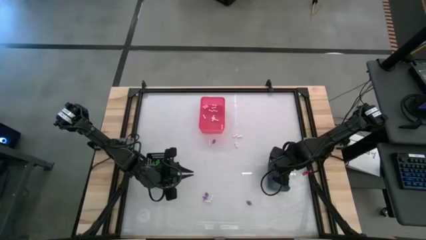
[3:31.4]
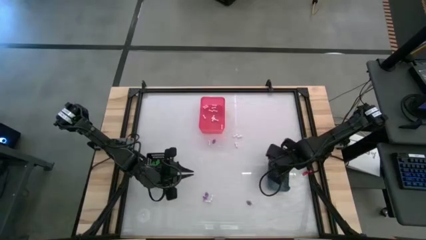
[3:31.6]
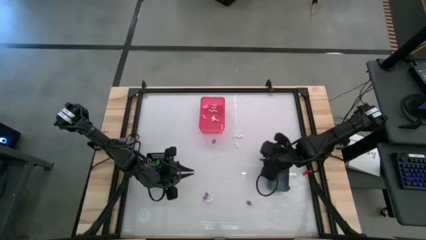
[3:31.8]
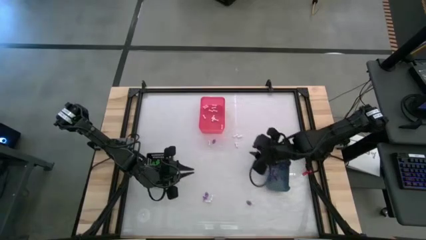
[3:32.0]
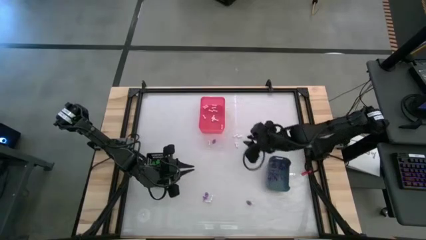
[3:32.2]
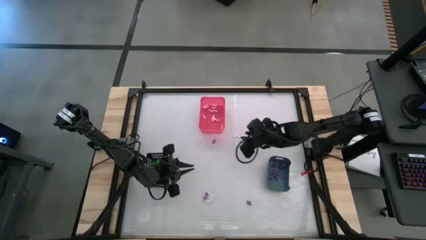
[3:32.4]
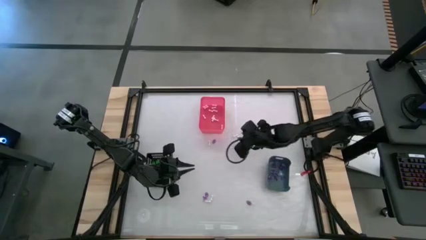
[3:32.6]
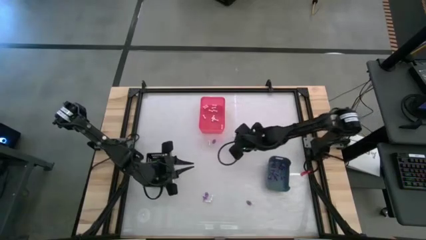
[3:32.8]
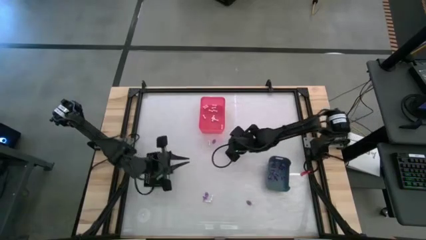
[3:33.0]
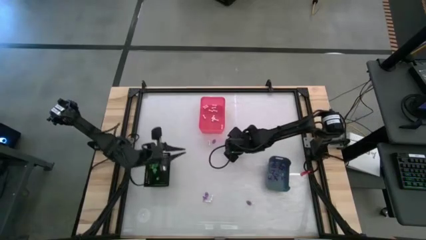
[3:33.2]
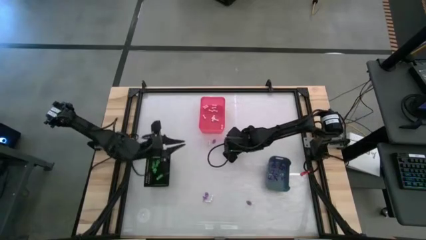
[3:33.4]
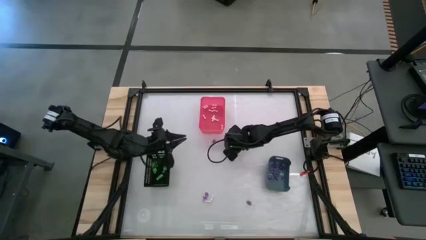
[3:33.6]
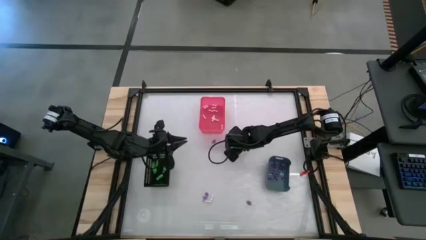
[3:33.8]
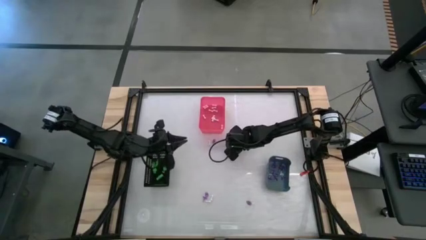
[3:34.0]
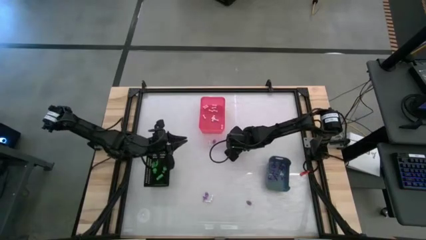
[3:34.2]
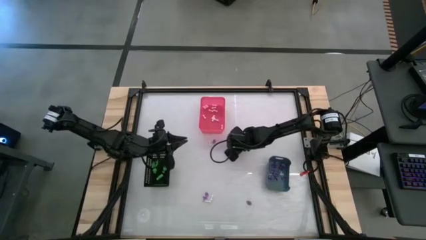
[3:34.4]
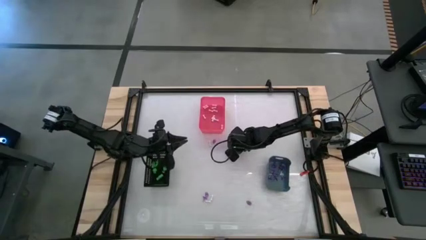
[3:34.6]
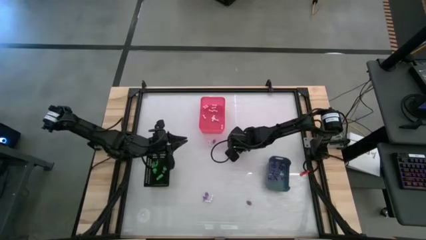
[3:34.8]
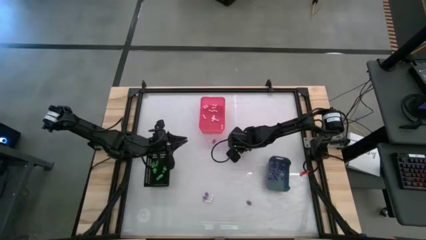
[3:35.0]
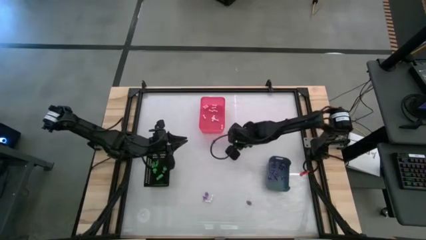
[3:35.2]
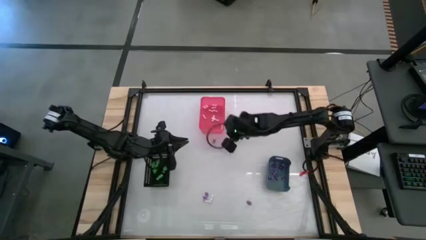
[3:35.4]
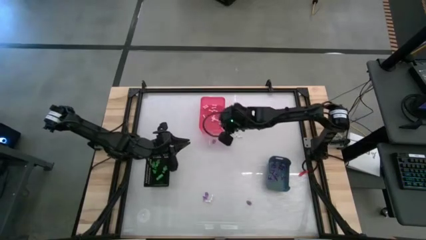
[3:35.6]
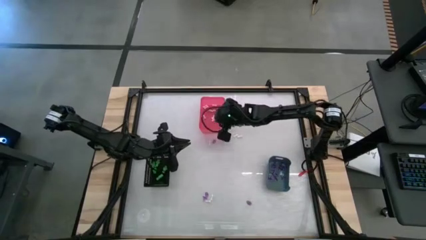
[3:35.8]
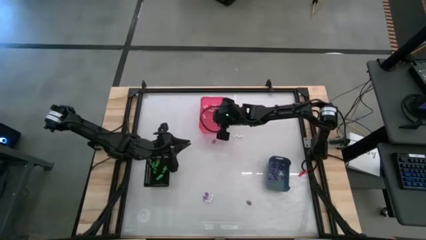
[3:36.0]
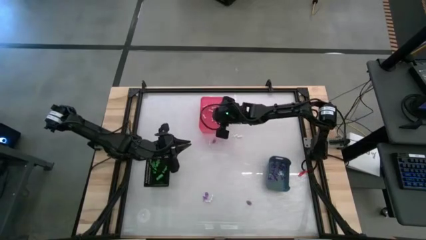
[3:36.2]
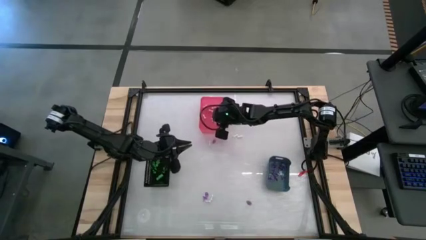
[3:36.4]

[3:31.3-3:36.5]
Task: Sort Halloween decoration
Put the bone toy into the red bin

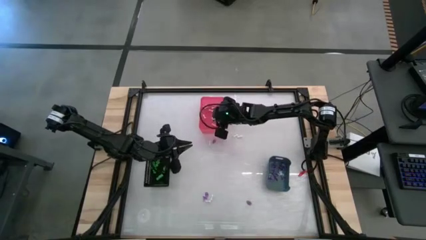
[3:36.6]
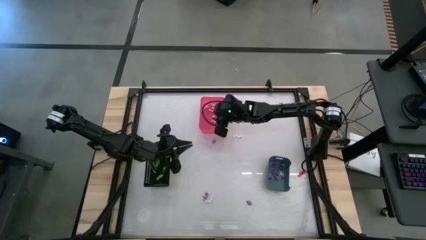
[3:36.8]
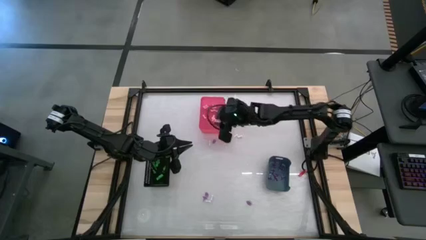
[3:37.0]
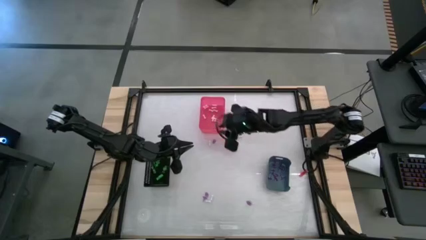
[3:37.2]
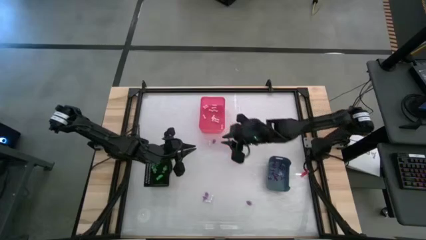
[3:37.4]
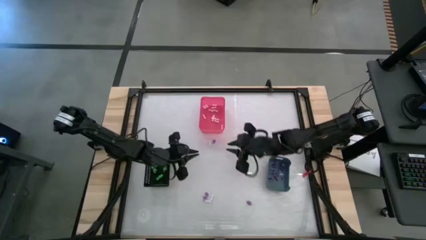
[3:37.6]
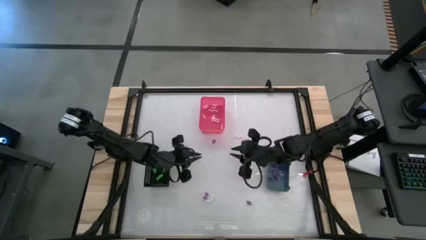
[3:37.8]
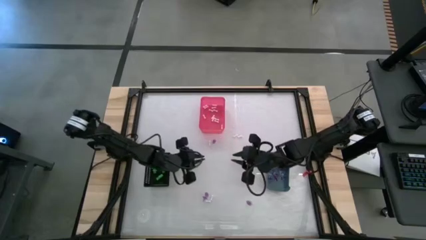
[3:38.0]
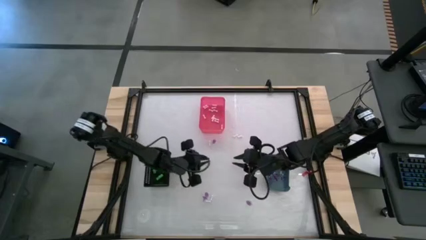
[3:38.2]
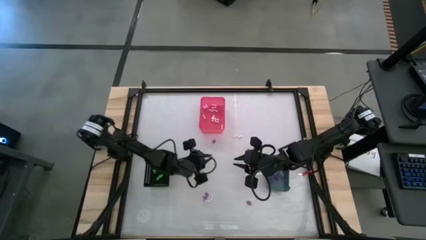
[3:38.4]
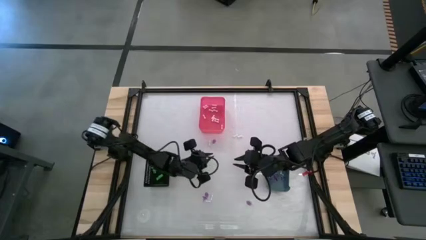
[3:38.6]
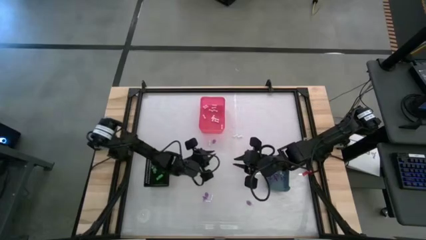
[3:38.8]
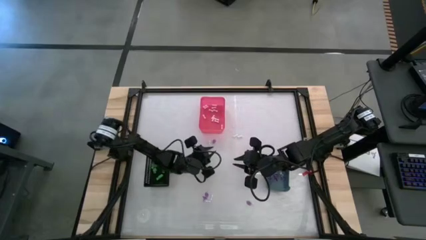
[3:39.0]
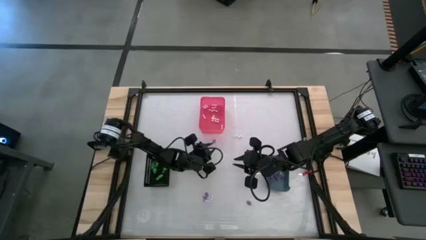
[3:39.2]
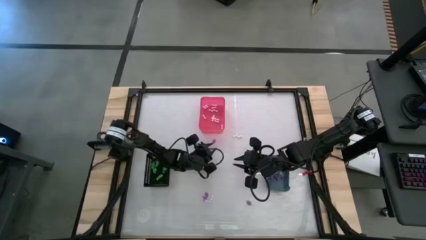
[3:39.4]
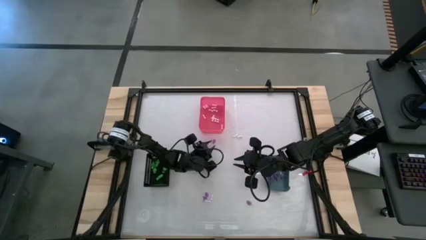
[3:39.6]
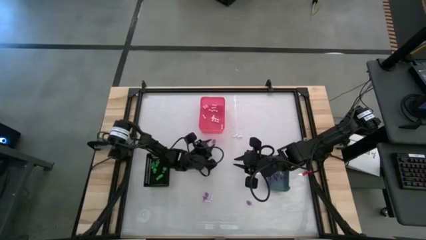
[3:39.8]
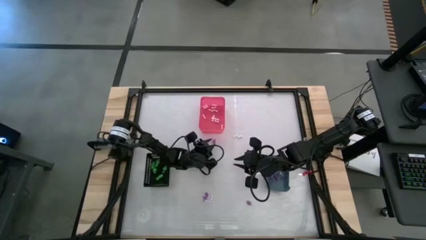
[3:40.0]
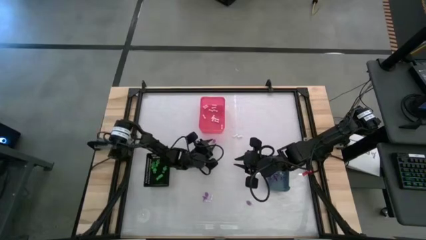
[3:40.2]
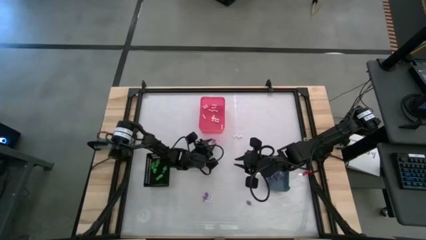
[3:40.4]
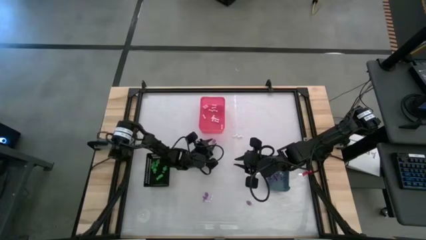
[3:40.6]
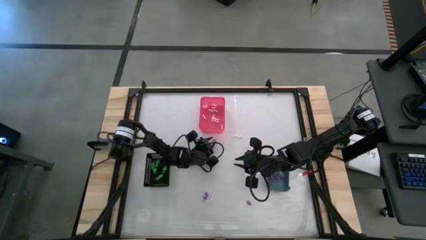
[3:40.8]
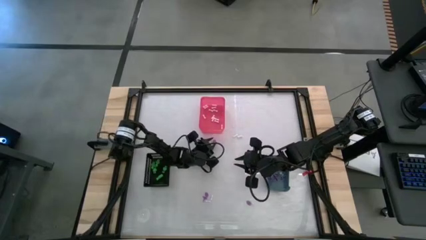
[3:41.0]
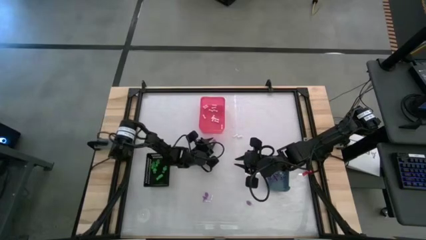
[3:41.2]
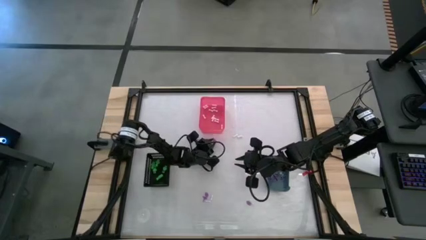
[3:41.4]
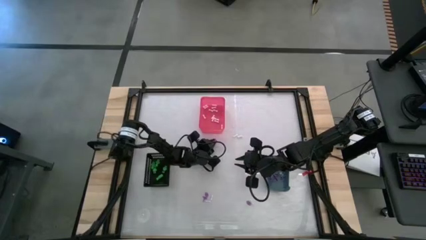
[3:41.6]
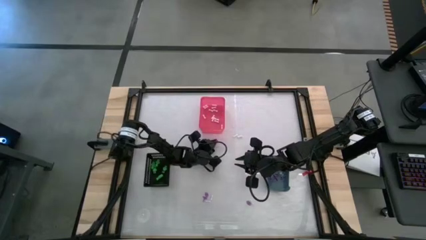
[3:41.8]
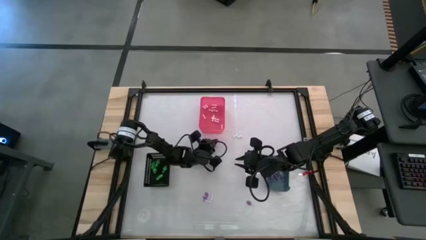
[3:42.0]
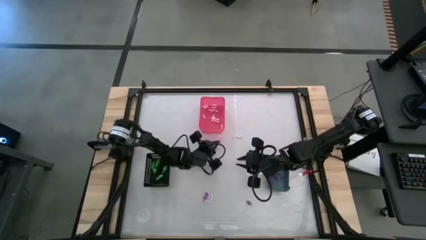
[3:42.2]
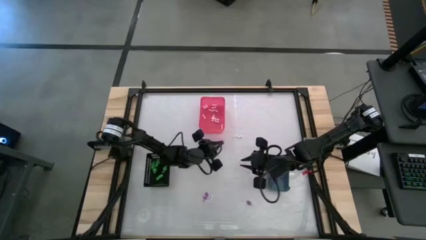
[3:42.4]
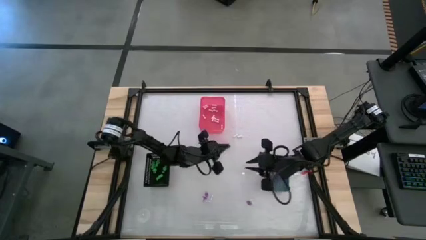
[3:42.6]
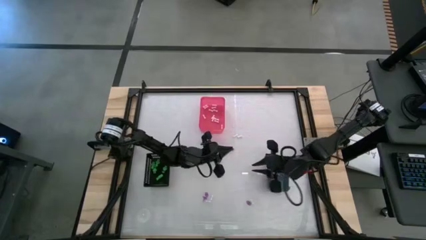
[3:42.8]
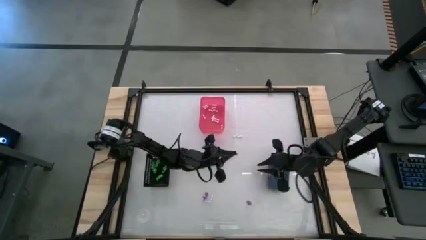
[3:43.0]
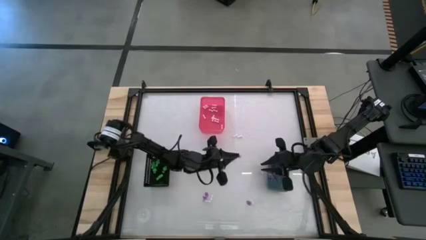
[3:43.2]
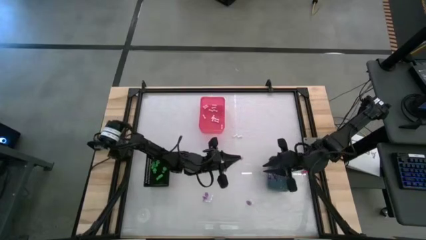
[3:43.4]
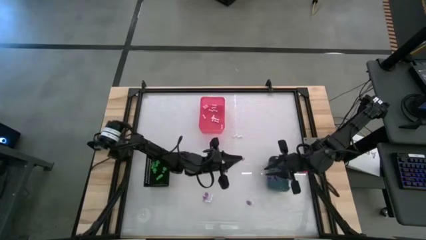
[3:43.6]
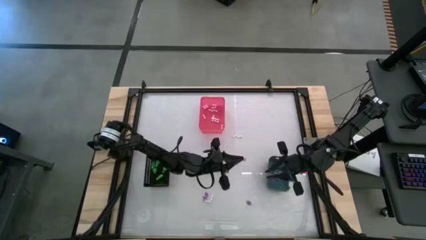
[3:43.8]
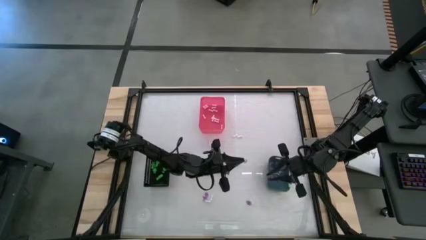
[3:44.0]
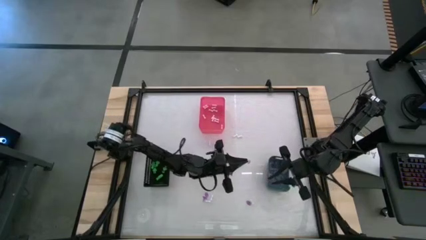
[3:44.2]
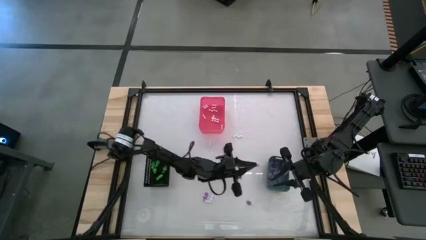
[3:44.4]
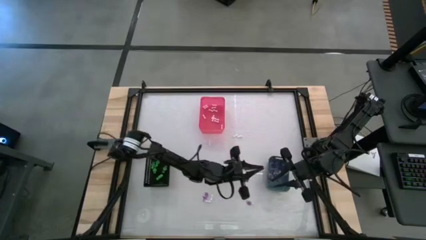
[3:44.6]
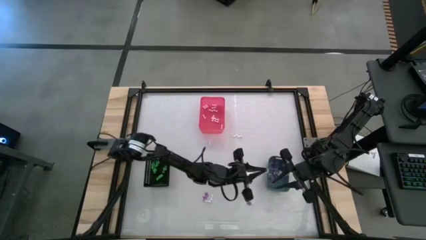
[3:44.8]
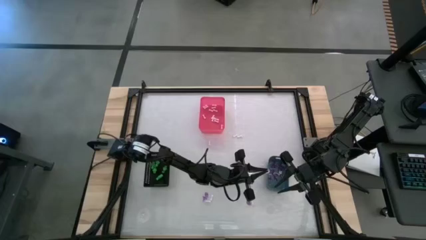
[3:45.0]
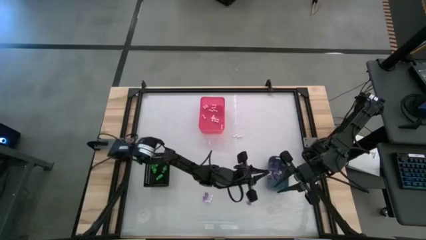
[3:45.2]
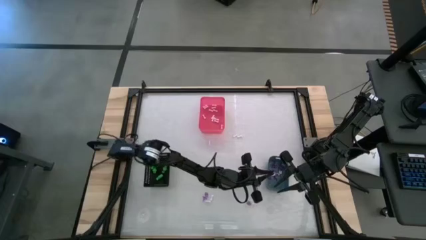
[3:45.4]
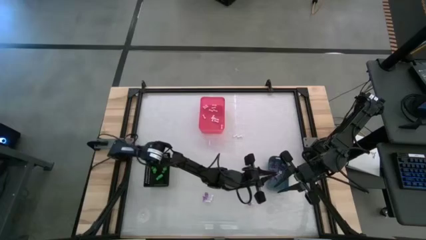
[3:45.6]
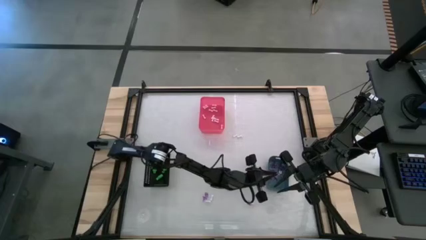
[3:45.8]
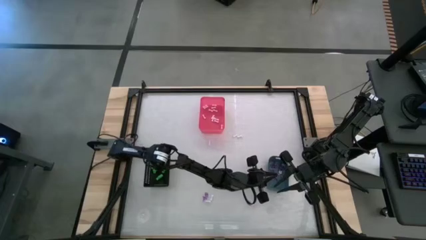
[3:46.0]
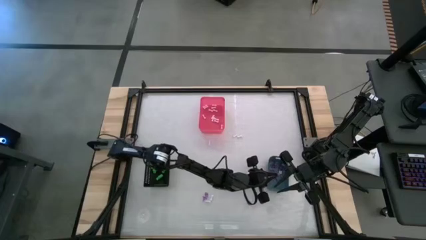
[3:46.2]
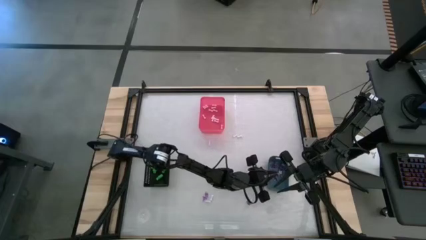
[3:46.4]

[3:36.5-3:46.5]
Put the witch hat toy into the blue bin
